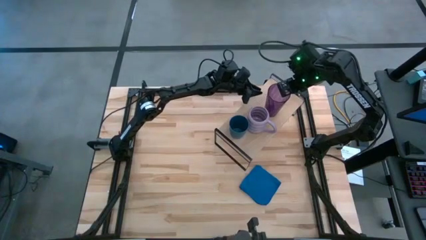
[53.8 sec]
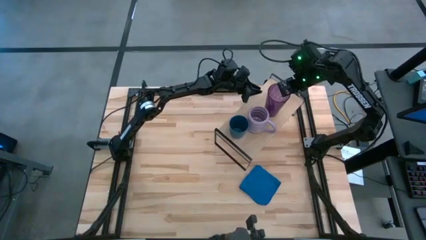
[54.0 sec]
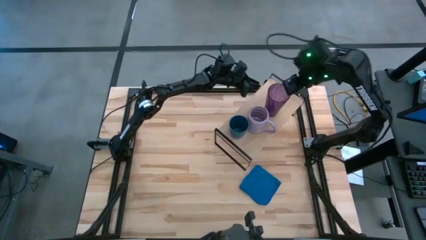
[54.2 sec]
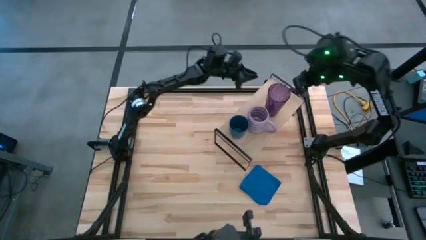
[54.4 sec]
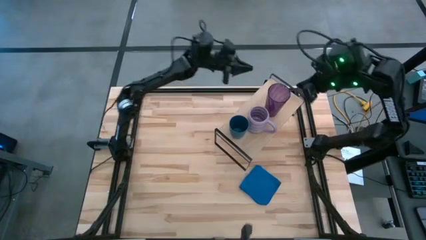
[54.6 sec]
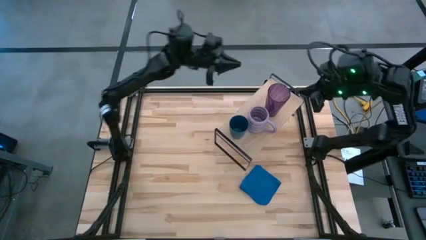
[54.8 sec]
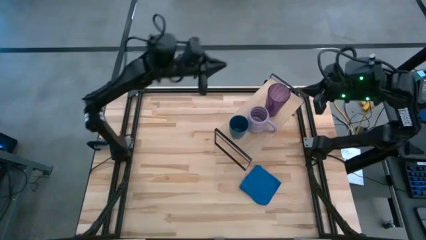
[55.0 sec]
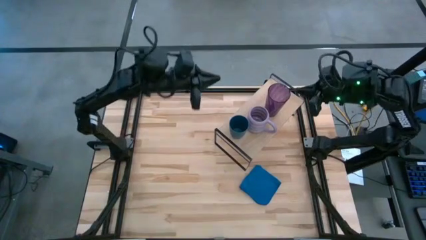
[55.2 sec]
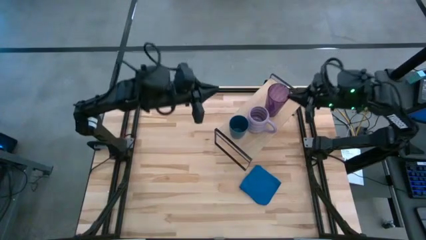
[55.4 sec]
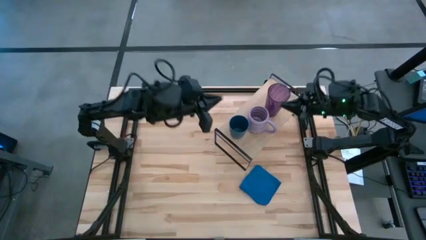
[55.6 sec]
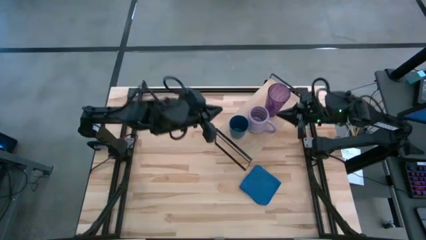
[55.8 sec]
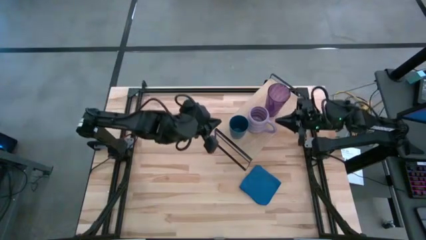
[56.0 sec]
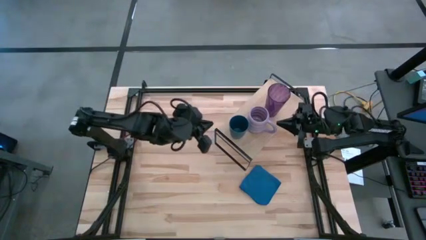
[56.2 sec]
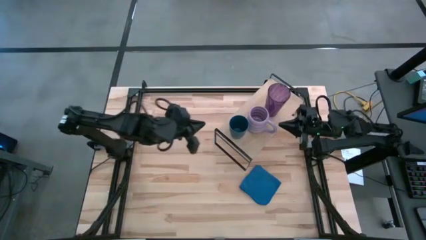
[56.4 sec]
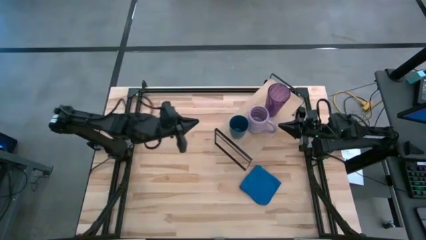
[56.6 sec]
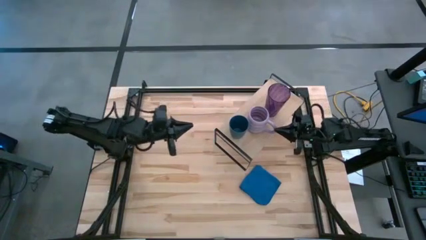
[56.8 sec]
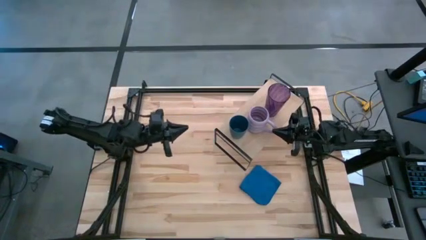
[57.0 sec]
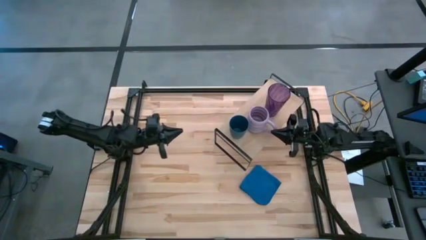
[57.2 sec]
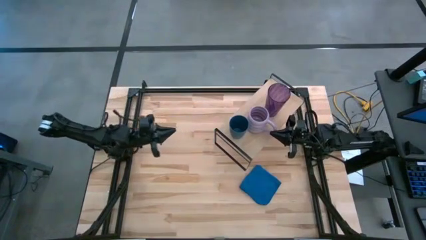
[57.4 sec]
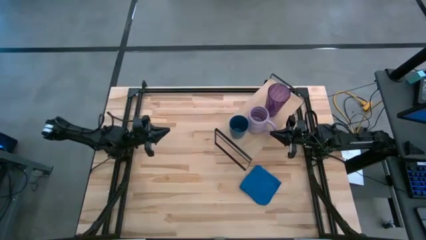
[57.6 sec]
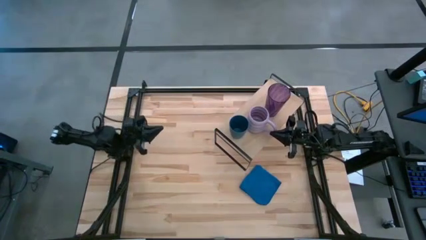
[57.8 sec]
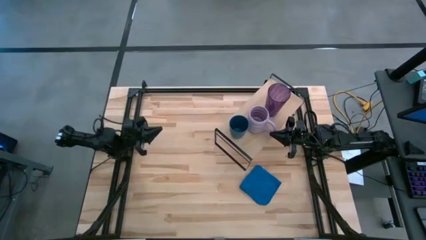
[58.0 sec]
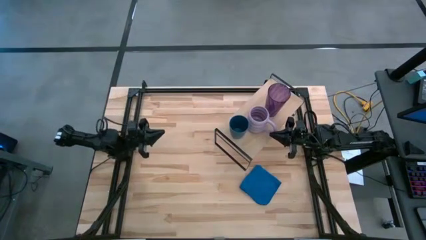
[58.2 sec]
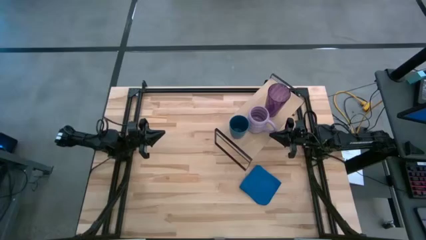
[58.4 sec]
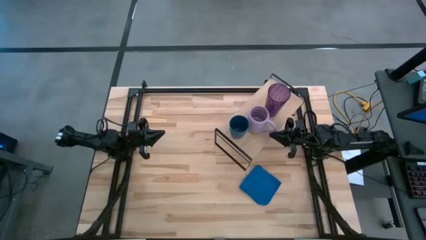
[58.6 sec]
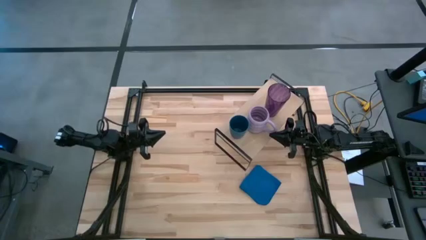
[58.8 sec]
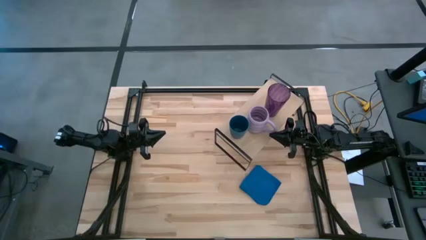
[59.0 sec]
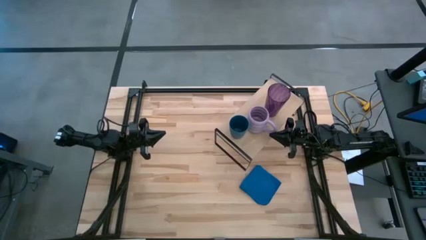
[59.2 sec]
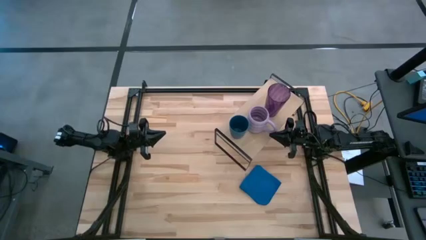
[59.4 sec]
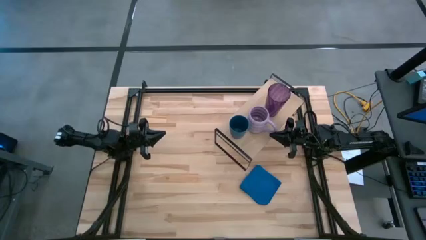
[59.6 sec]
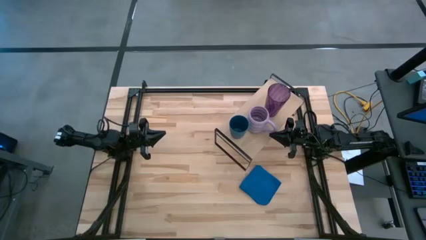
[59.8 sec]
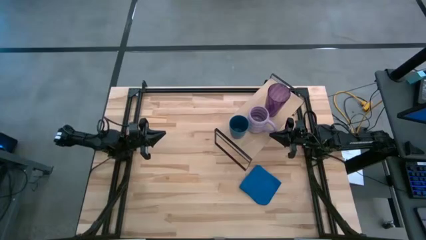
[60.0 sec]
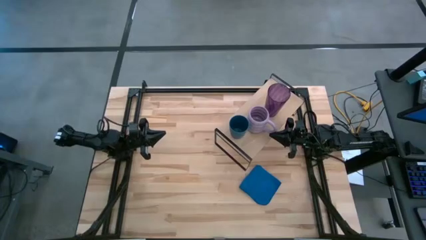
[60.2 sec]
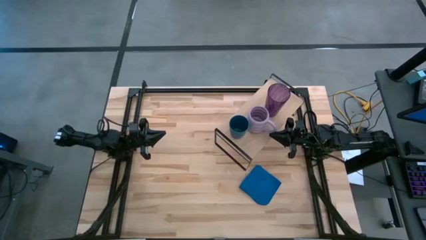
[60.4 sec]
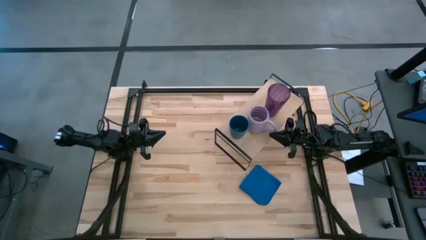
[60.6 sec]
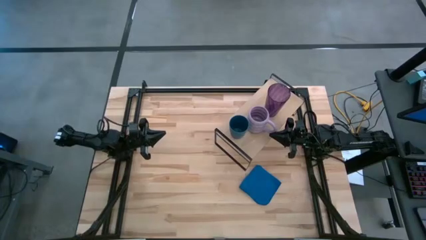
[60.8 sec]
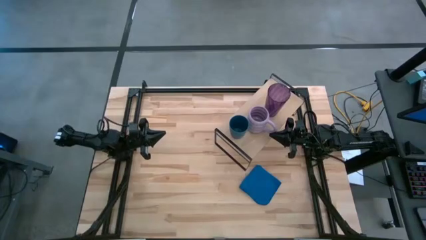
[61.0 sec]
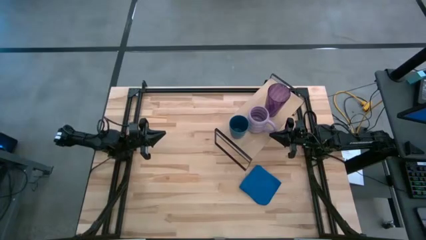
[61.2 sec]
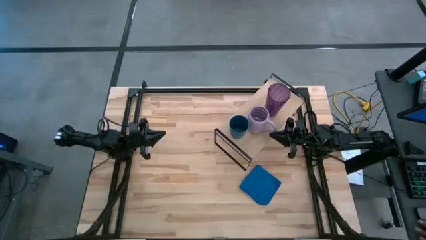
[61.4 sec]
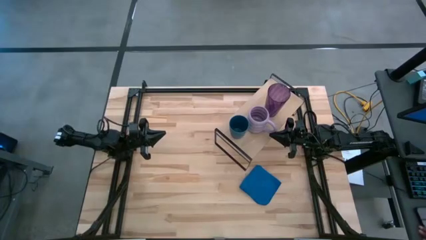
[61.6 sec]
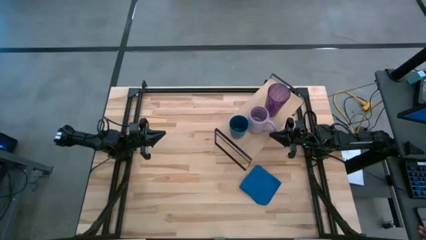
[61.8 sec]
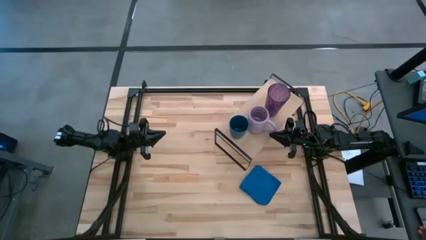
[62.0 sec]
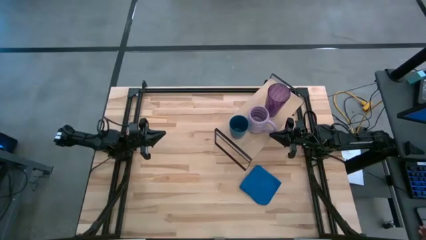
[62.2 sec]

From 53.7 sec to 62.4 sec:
Task: Stack small to large cups/mugs on shelf
Return to Home Position
